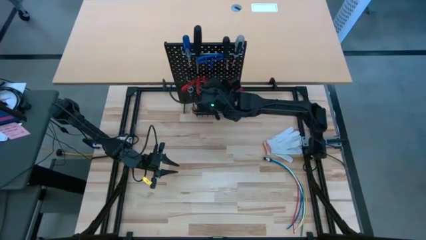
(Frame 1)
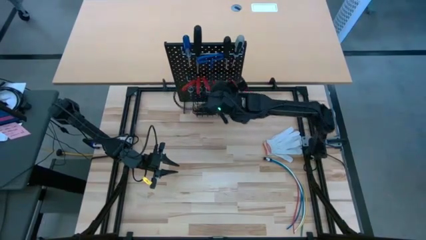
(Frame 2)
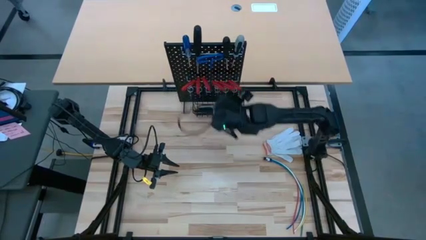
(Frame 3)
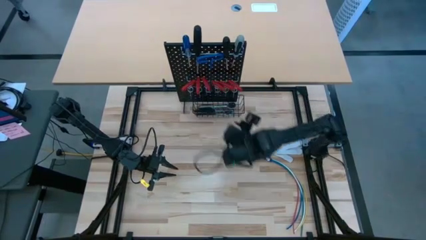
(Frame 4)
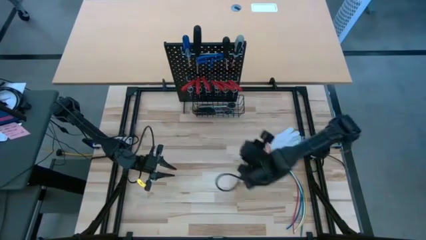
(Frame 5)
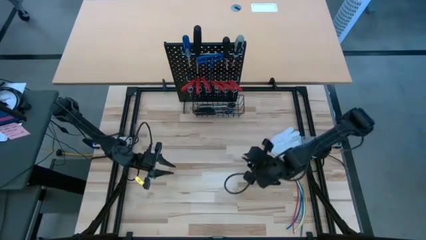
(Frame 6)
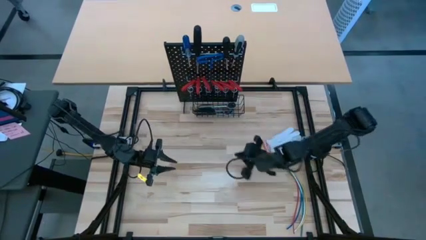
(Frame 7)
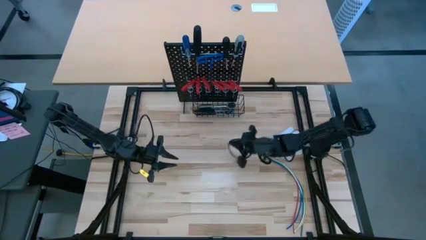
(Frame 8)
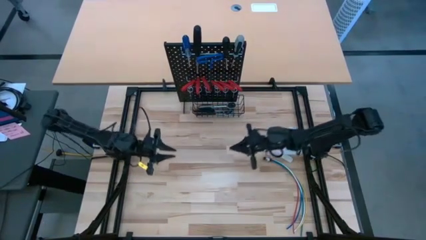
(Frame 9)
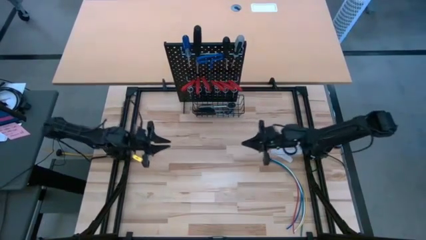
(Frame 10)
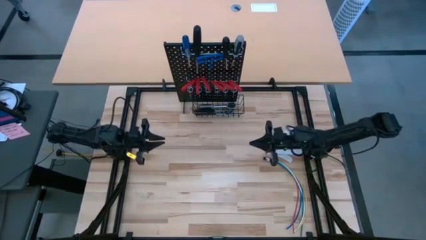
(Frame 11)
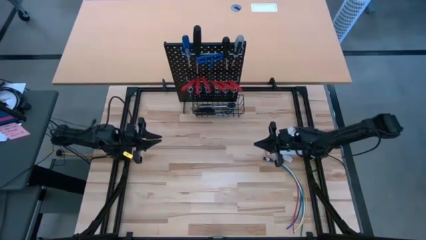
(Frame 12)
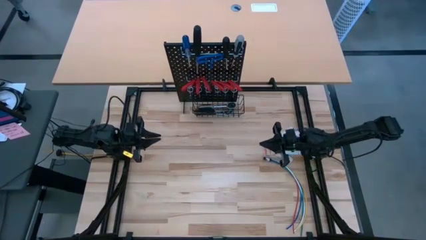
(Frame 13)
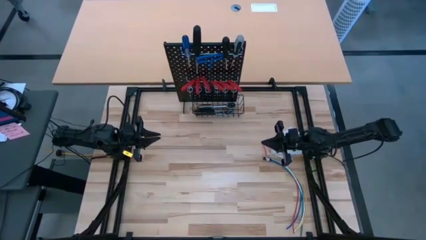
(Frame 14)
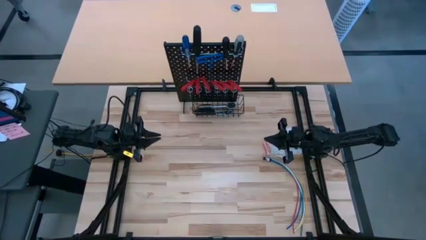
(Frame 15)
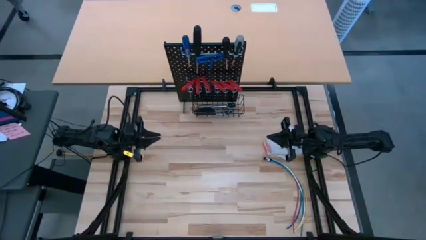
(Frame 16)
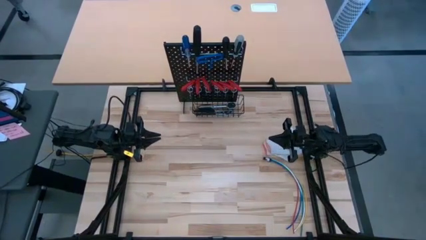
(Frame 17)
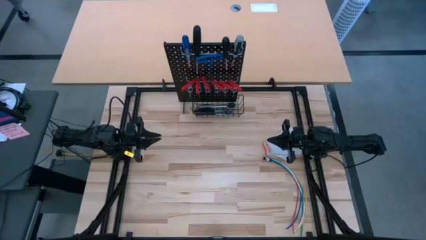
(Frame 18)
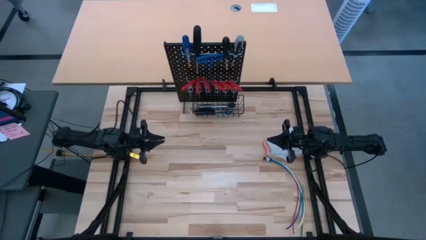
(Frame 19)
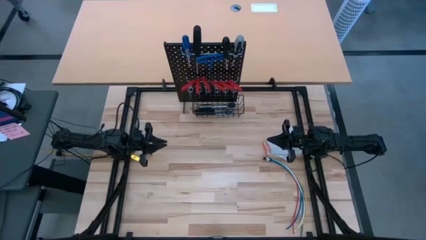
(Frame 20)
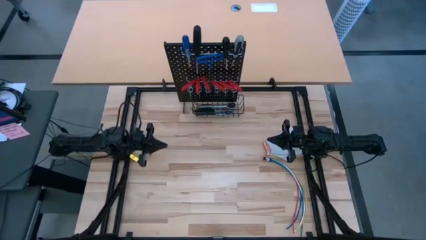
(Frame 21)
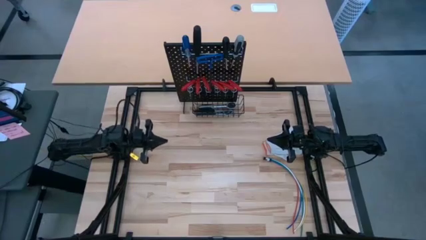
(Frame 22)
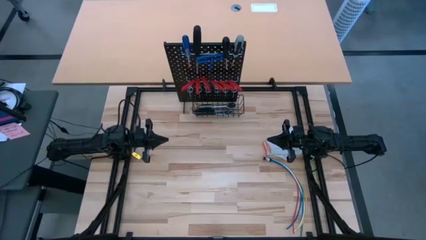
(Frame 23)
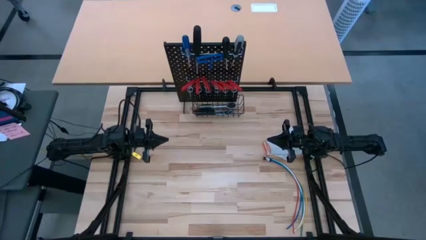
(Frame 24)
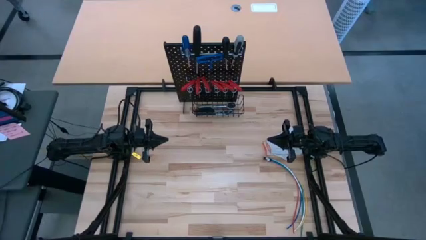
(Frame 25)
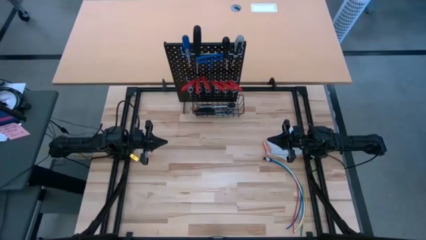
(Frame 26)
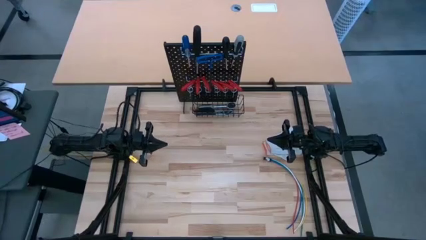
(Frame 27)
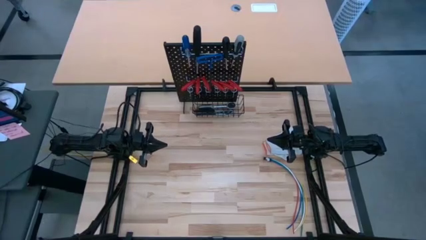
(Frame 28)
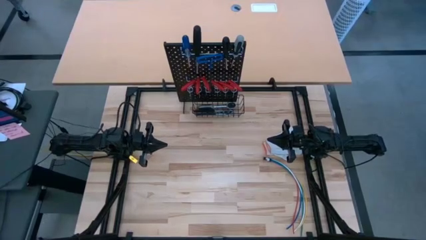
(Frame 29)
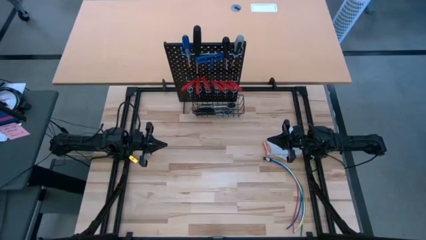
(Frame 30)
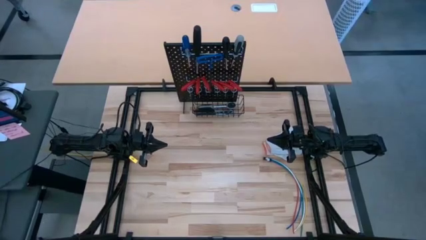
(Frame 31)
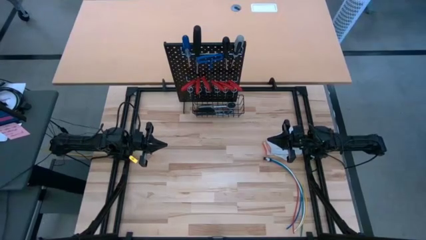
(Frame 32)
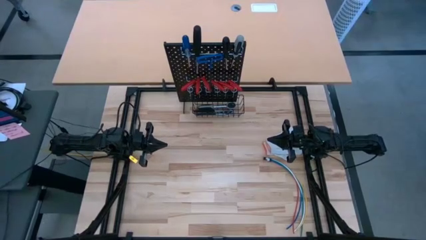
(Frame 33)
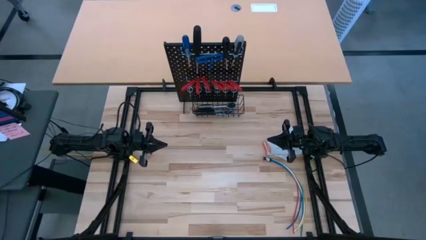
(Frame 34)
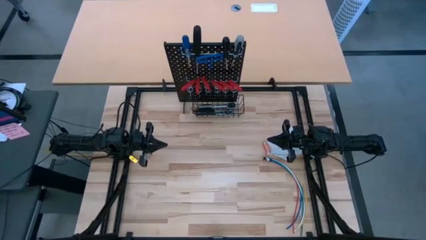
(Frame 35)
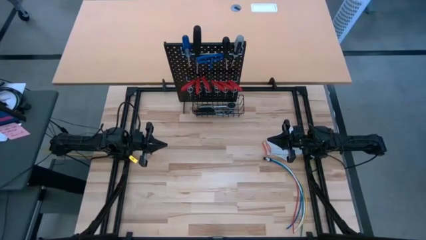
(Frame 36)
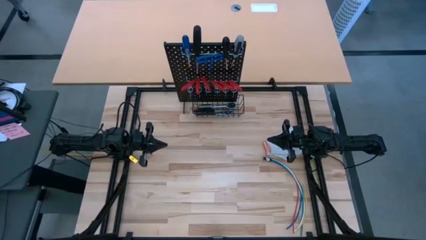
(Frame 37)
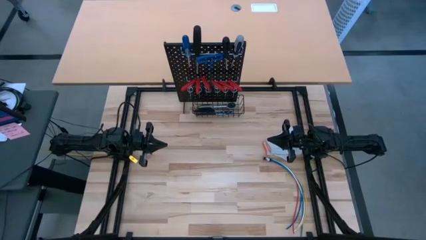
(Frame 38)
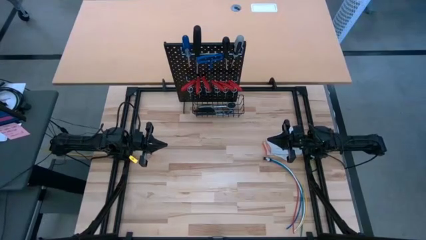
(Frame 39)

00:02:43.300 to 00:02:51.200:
Task: Hang tools onto peg board
Return to Home Position

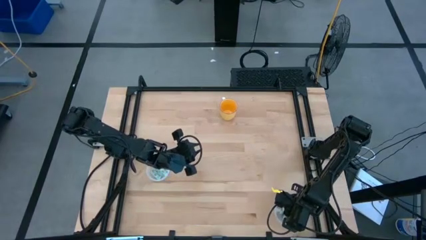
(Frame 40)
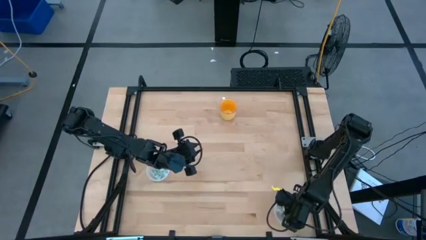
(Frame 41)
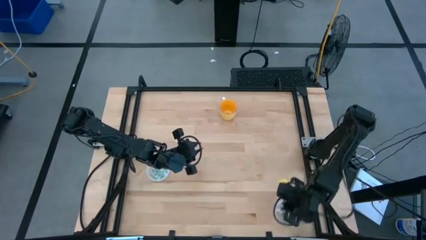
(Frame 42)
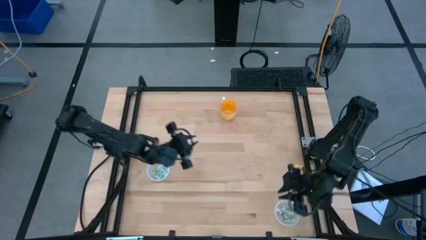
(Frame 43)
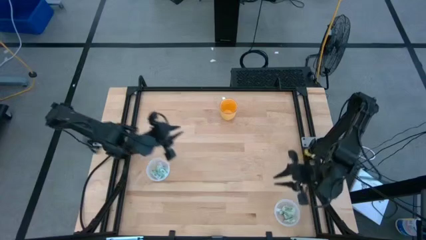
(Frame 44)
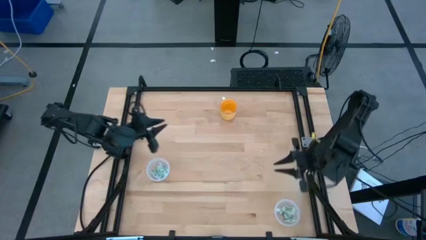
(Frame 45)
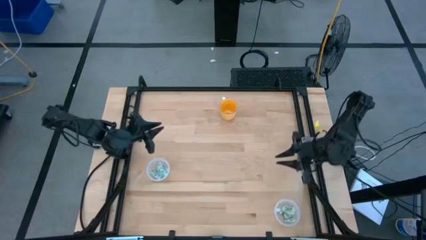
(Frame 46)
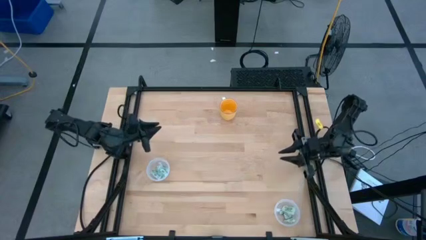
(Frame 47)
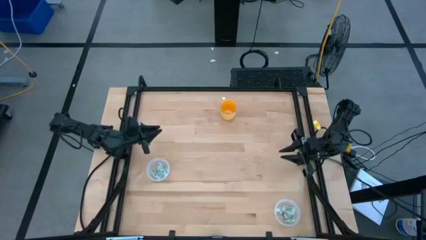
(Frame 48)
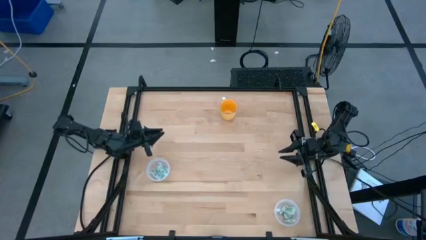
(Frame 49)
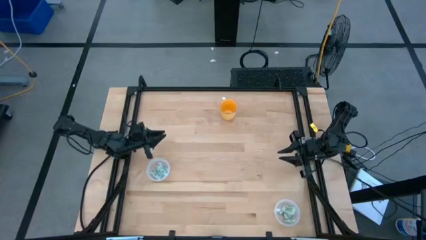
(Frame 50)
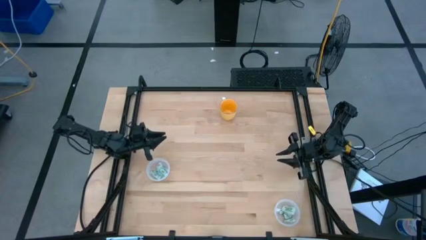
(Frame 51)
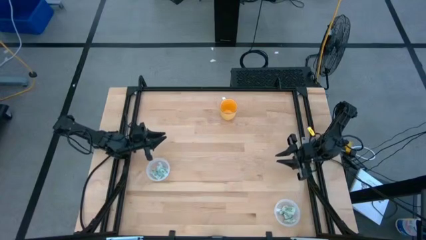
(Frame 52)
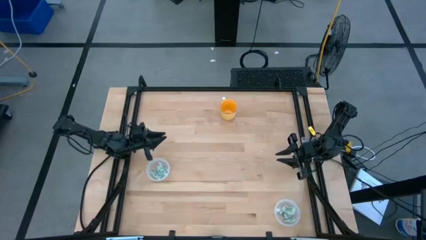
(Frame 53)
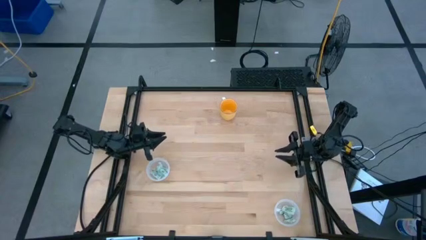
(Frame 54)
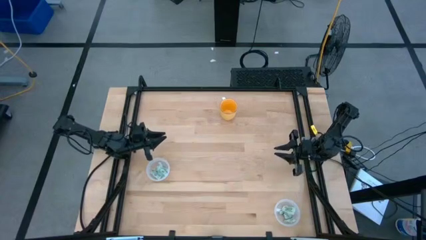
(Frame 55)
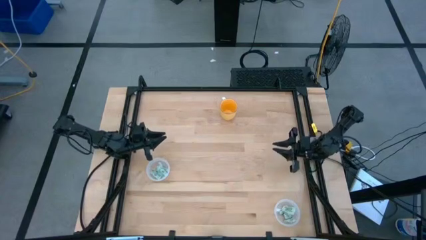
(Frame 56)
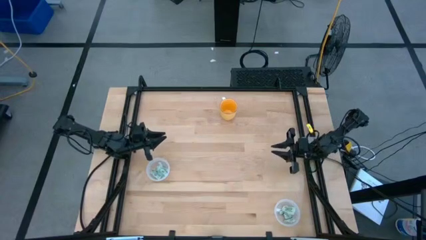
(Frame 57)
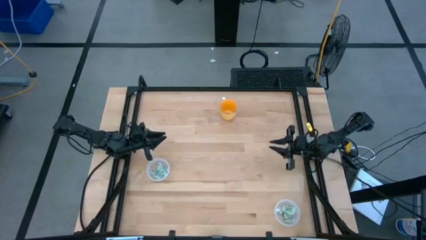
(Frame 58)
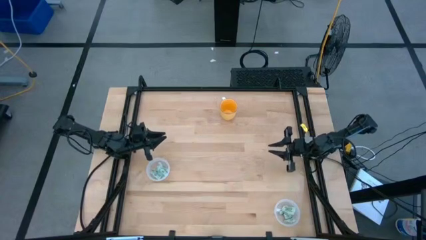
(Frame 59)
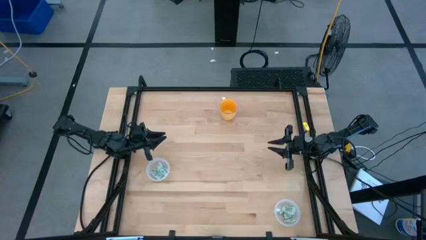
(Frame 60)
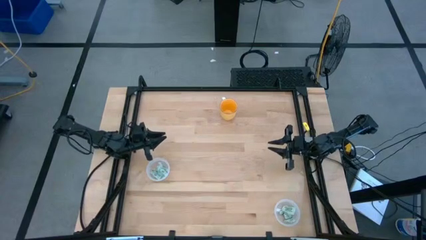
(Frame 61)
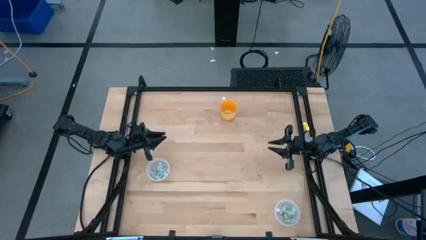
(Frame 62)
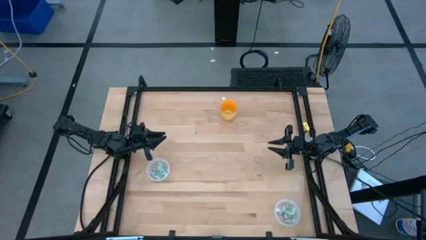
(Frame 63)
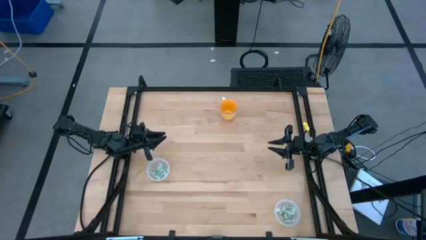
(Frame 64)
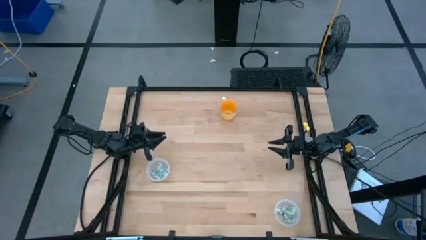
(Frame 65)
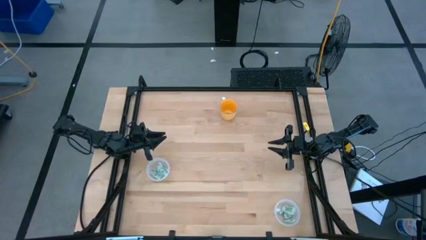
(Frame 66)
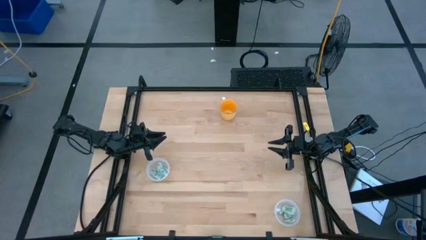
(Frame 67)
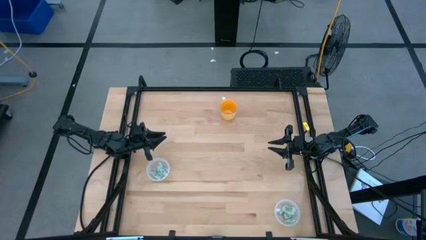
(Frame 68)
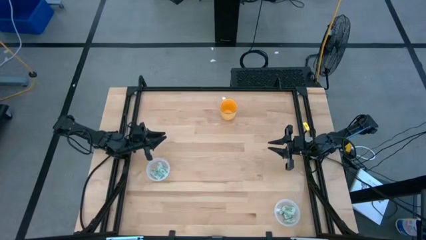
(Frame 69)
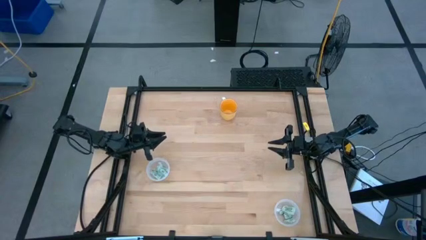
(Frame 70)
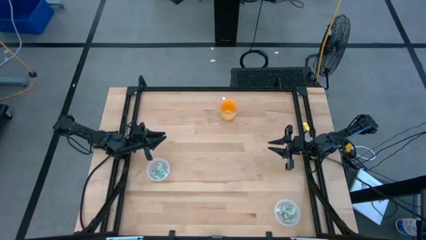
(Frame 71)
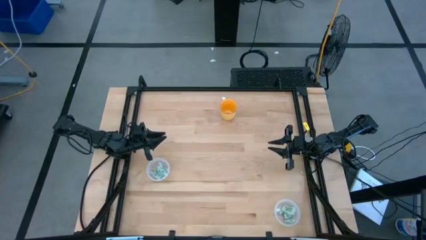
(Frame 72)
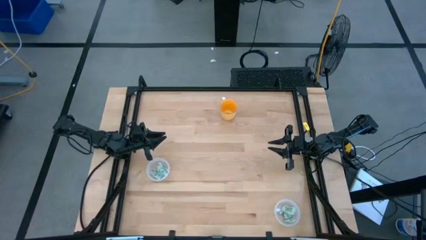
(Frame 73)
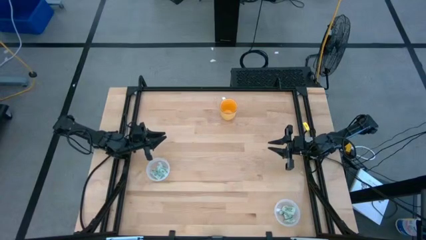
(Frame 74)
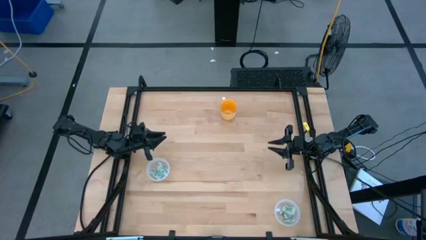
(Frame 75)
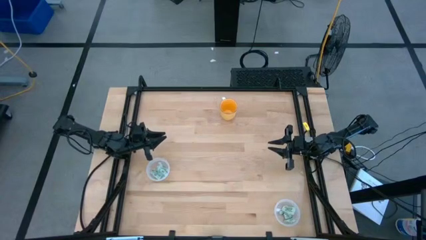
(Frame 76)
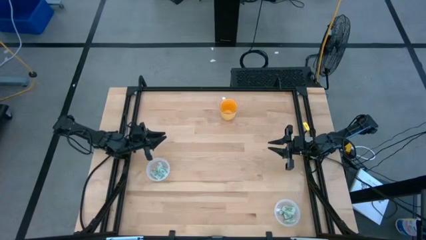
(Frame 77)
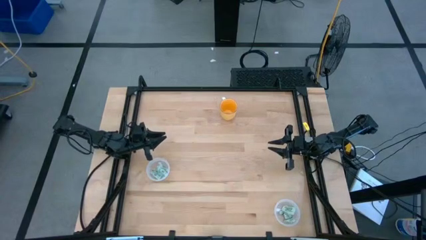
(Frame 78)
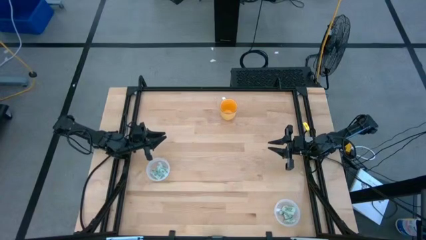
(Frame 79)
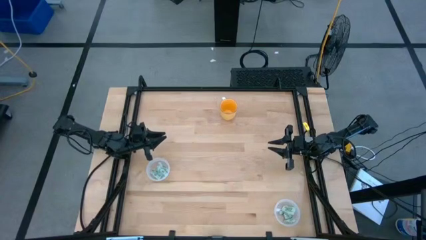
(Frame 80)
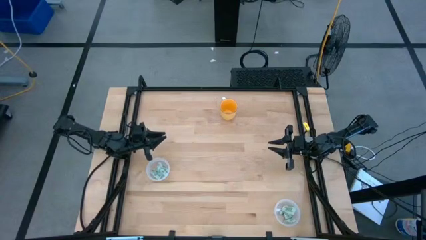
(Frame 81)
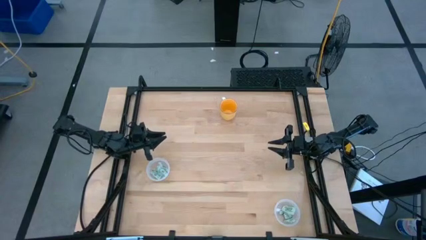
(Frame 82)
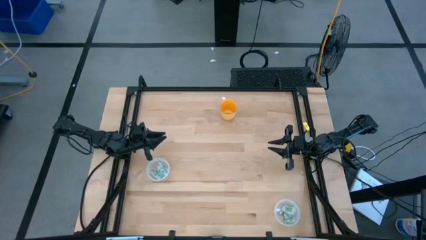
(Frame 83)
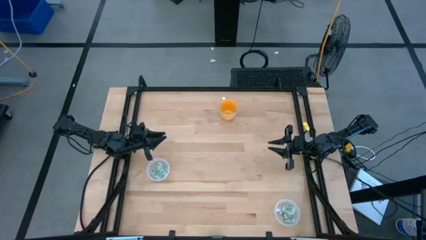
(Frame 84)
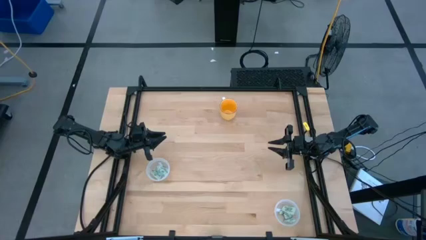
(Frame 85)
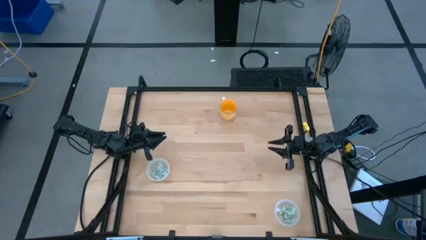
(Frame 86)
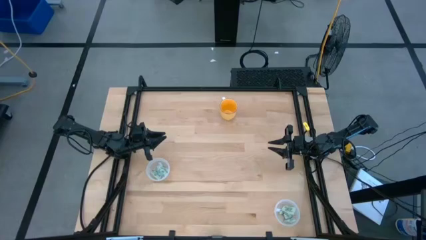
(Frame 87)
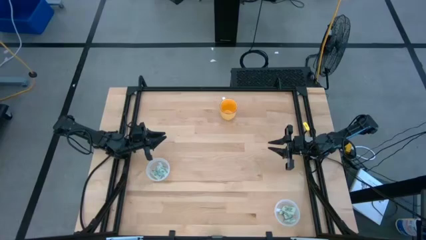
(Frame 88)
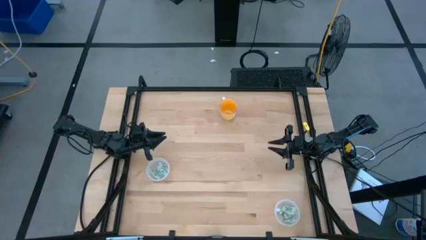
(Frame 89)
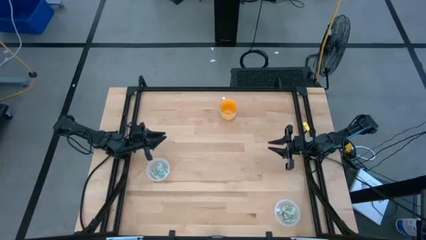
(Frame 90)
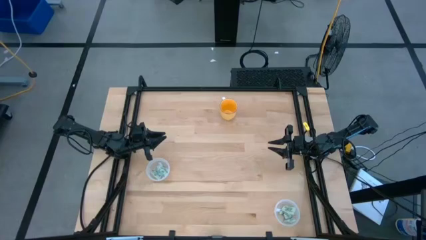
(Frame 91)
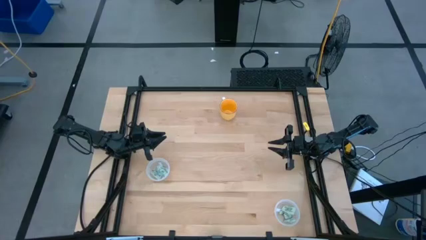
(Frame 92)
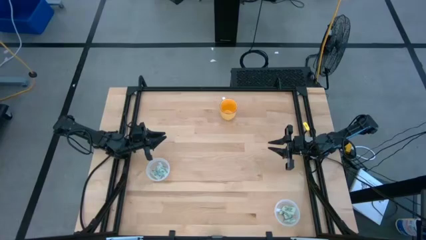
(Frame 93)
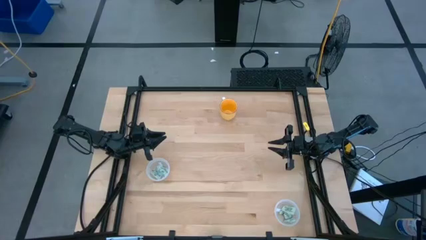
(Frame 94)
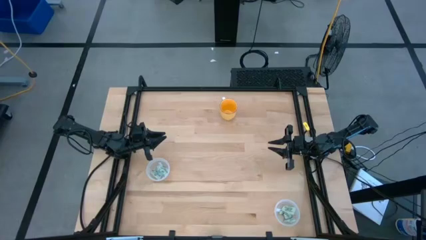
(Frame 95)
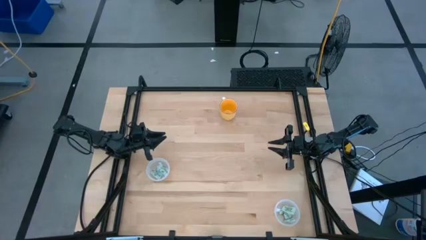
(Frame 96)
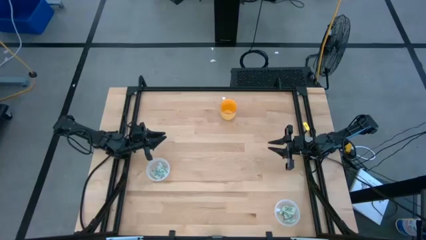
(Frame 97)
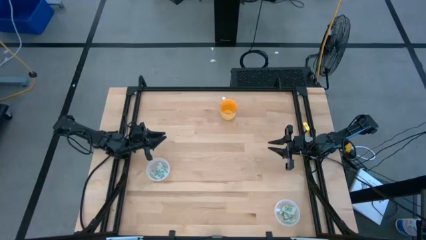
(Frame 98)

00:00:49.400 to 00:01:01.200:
Task: Pick and place Stevia / Truvia into bins
Return to Home Position
